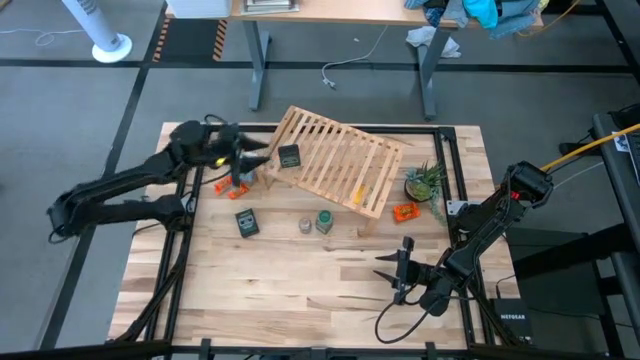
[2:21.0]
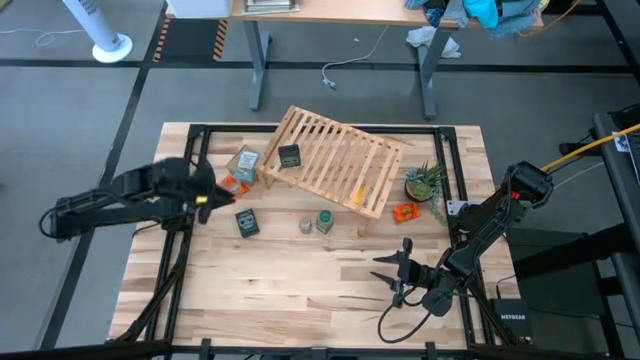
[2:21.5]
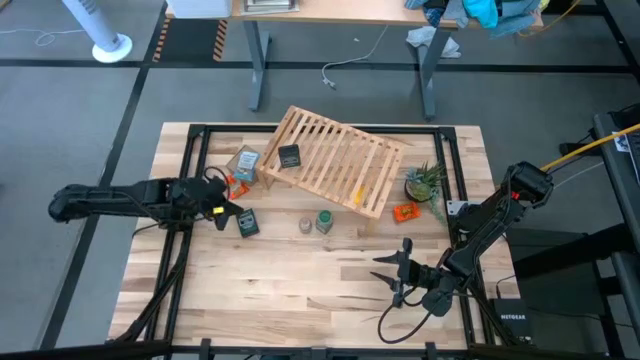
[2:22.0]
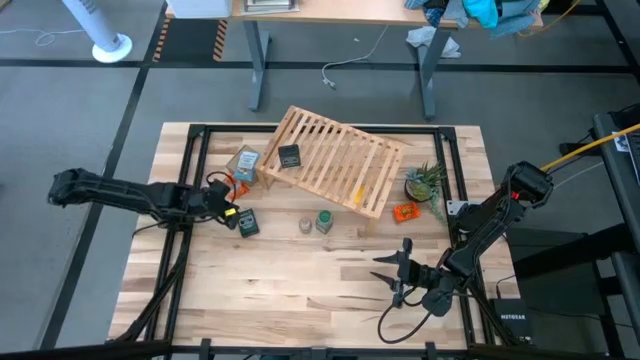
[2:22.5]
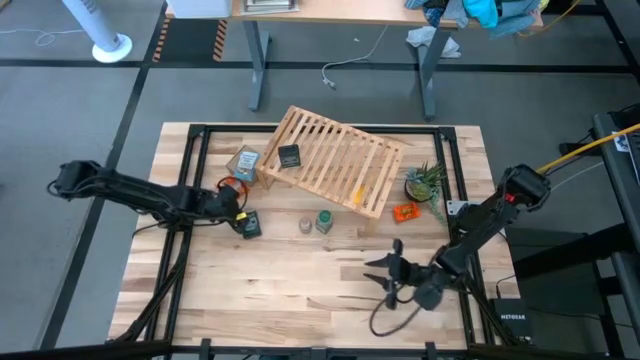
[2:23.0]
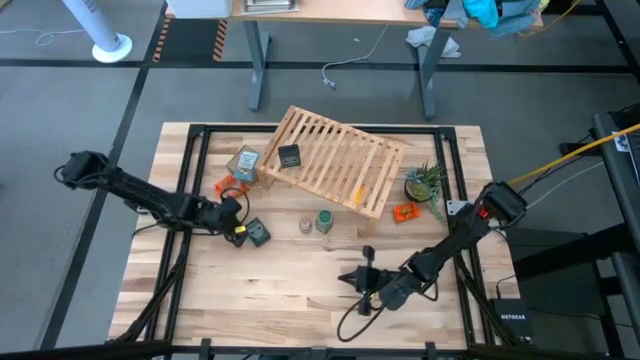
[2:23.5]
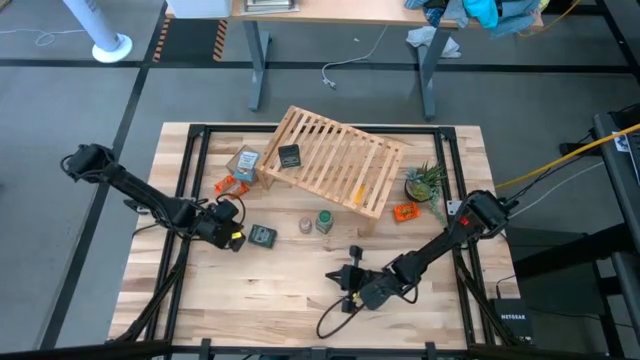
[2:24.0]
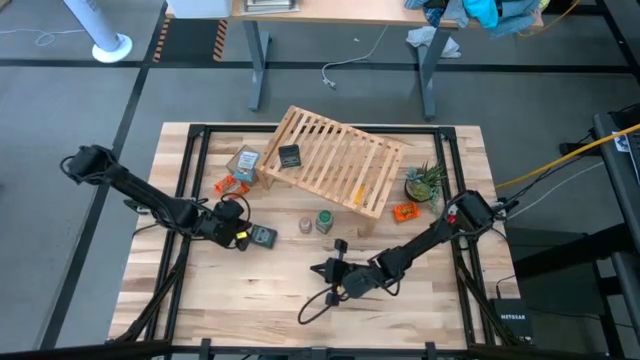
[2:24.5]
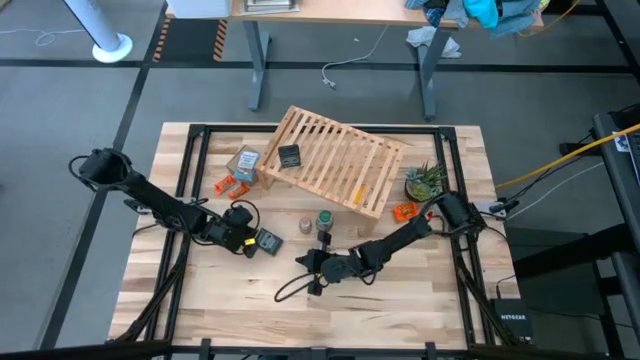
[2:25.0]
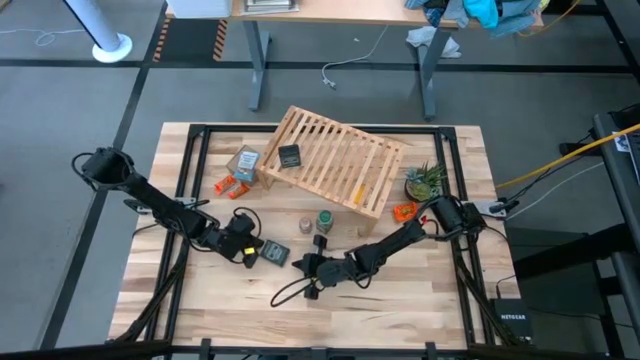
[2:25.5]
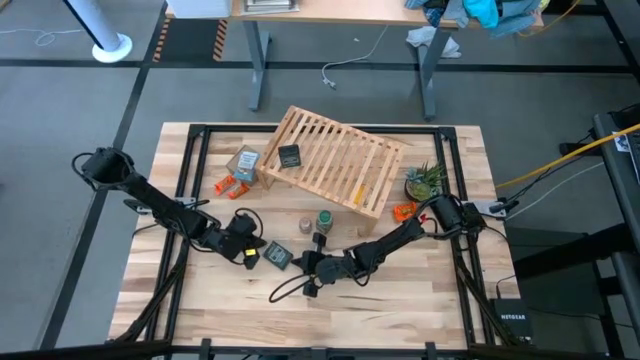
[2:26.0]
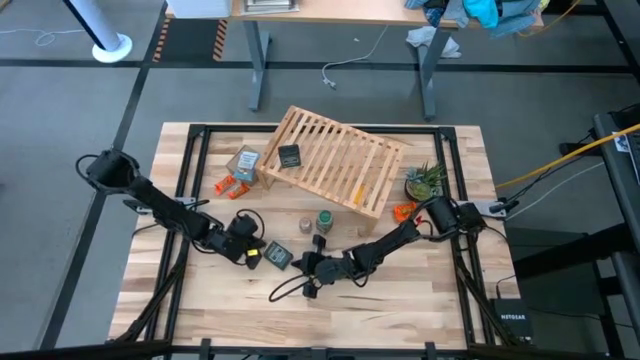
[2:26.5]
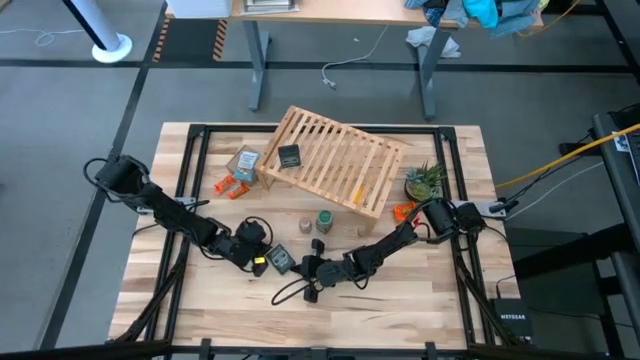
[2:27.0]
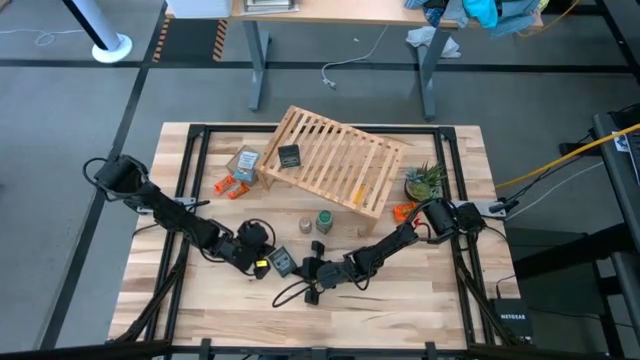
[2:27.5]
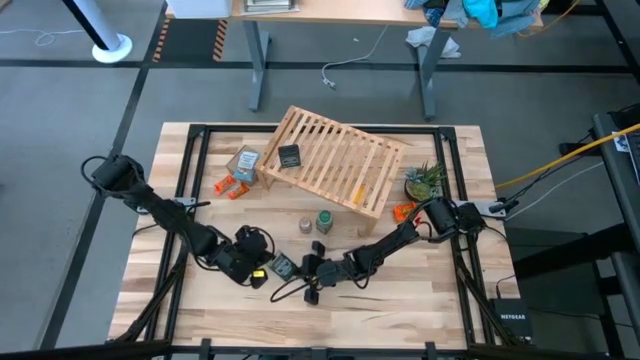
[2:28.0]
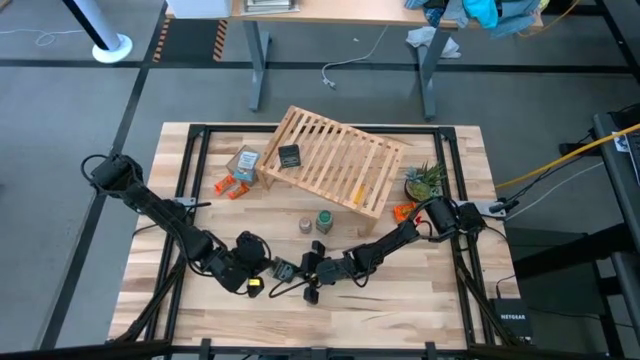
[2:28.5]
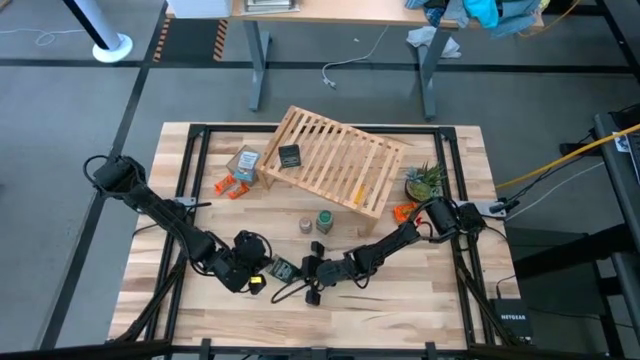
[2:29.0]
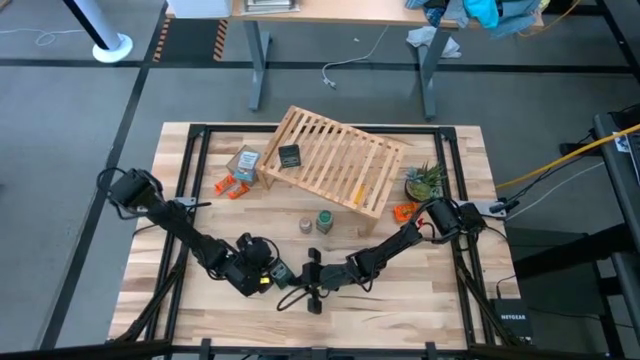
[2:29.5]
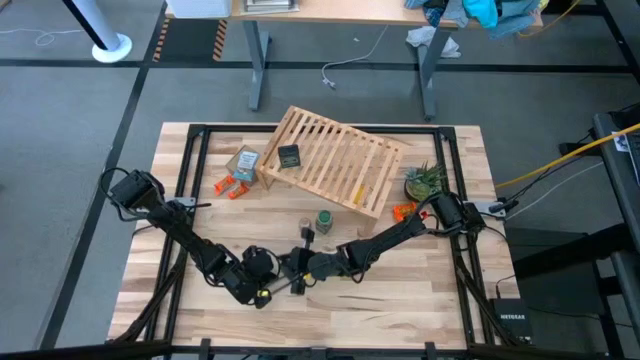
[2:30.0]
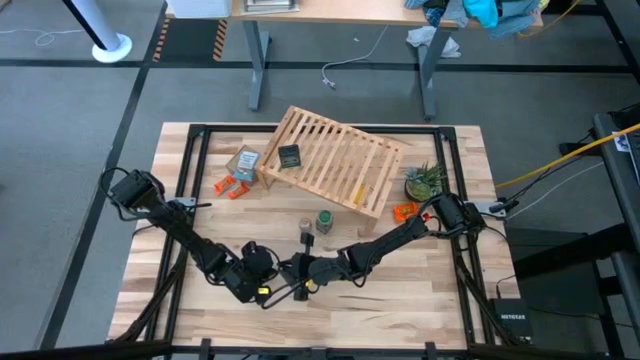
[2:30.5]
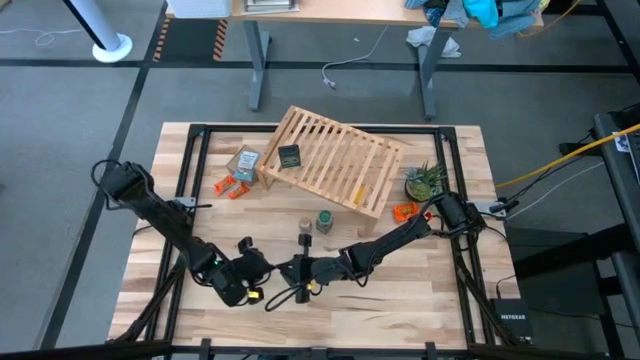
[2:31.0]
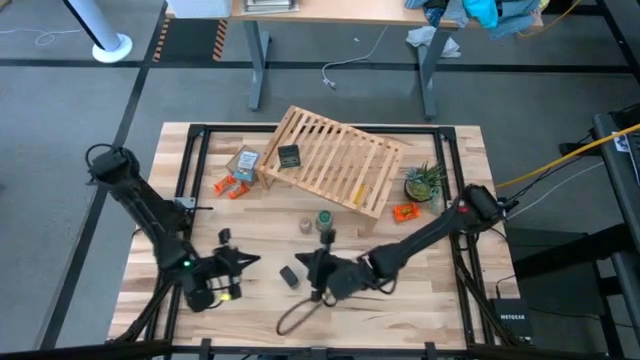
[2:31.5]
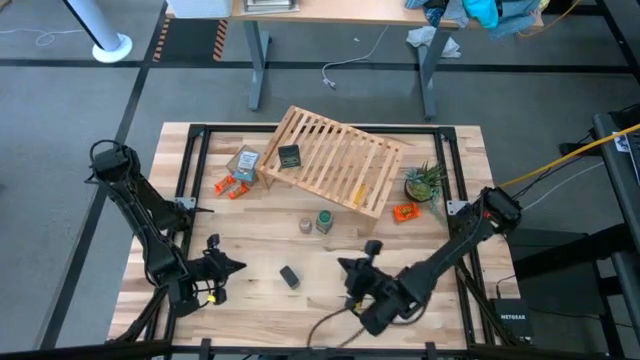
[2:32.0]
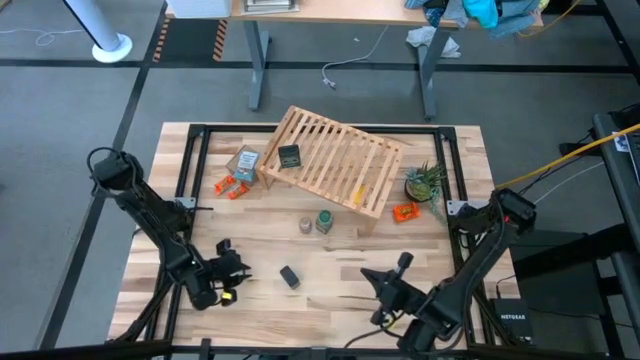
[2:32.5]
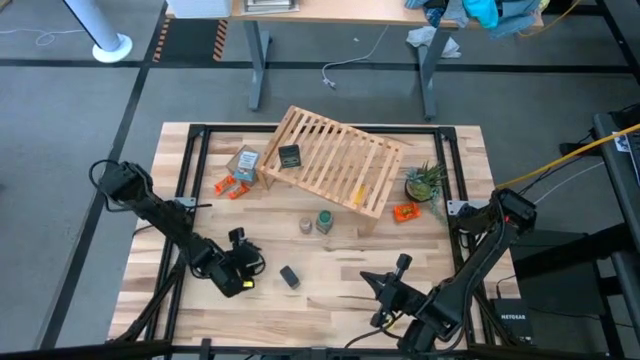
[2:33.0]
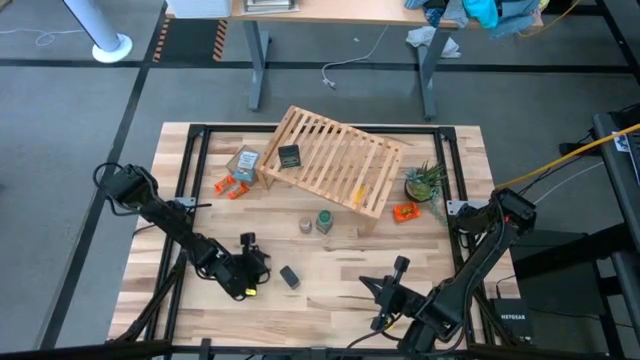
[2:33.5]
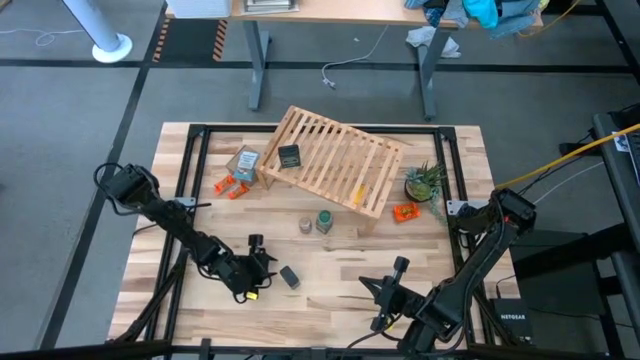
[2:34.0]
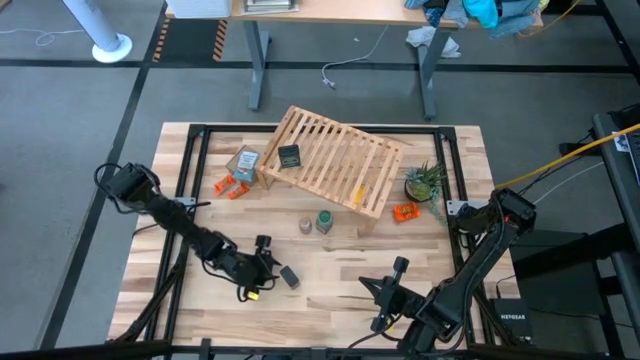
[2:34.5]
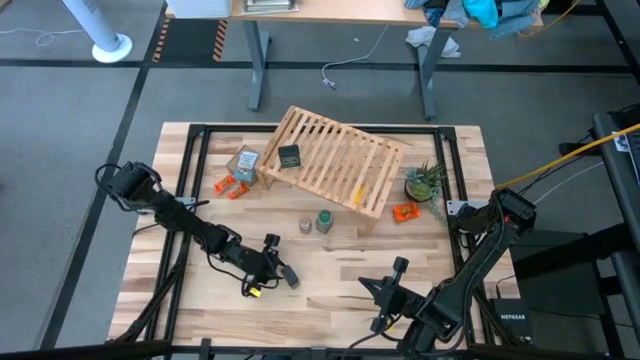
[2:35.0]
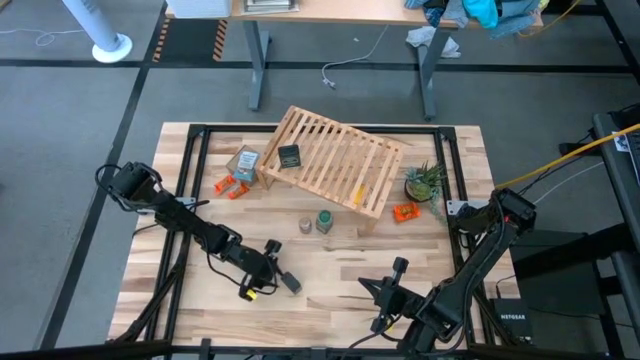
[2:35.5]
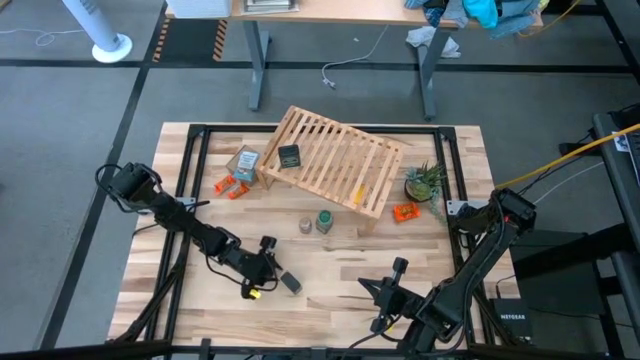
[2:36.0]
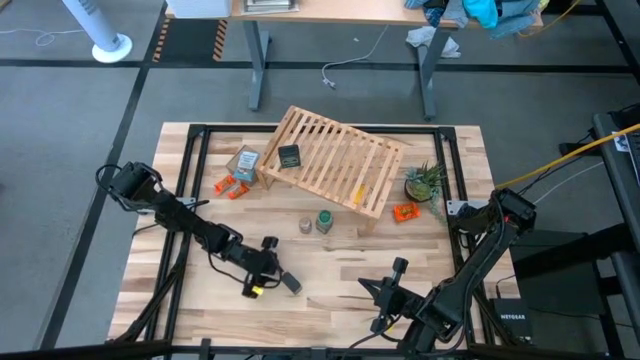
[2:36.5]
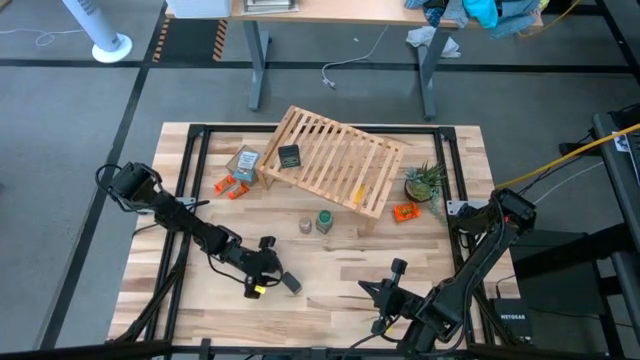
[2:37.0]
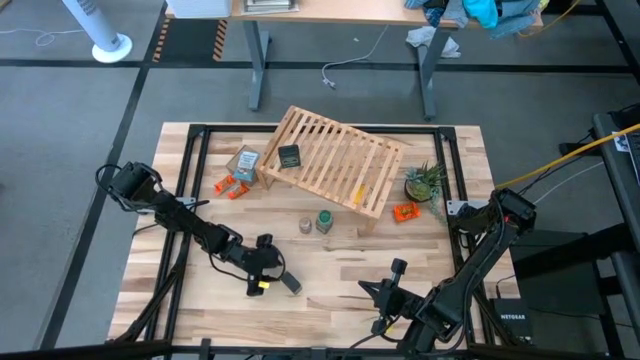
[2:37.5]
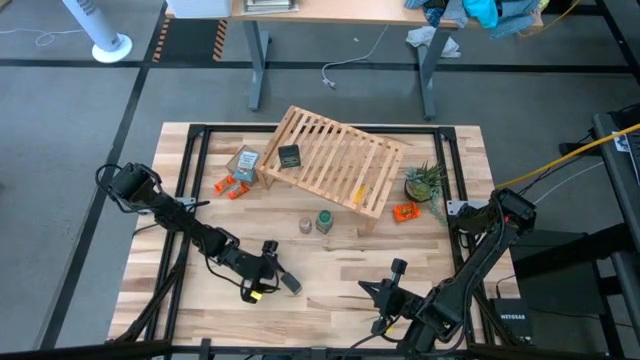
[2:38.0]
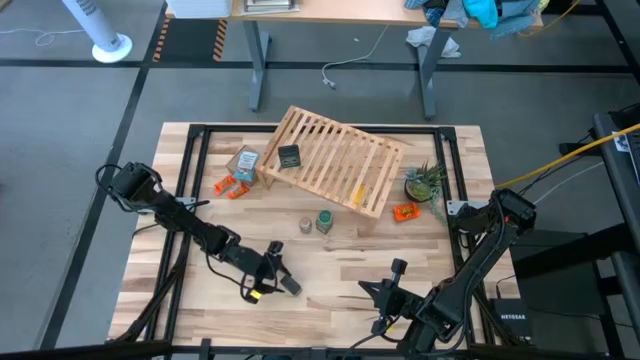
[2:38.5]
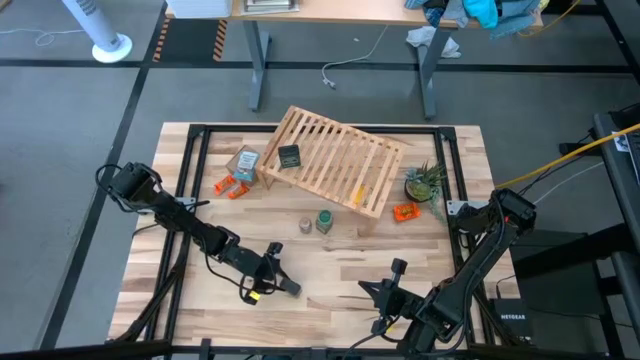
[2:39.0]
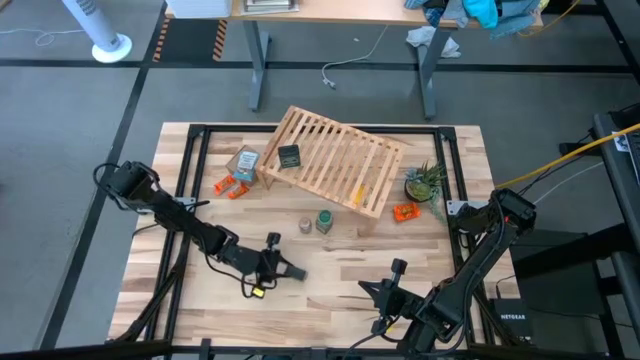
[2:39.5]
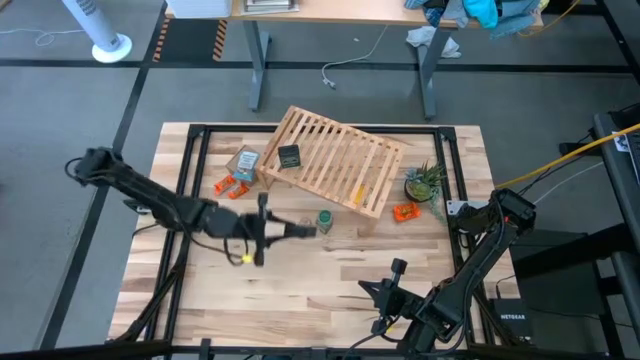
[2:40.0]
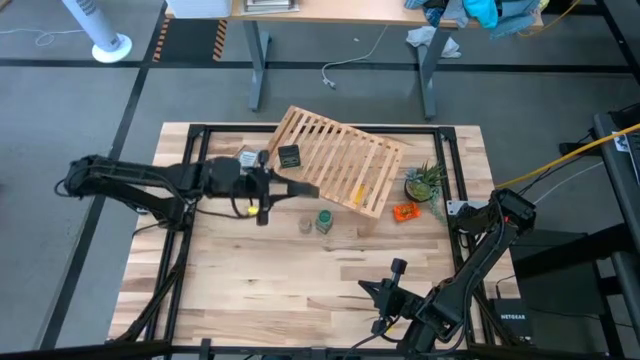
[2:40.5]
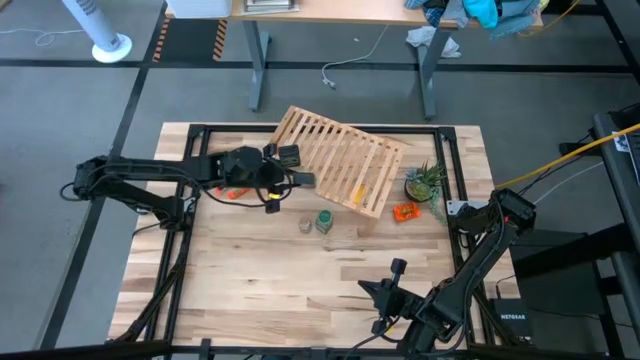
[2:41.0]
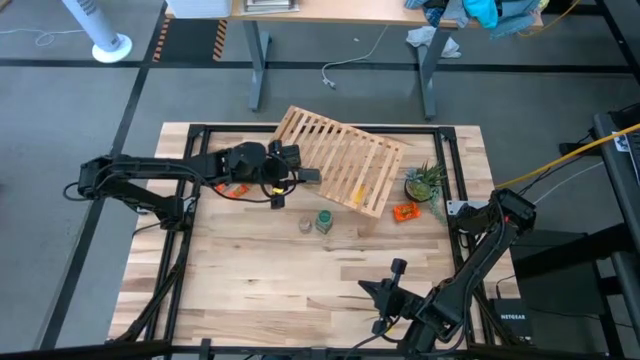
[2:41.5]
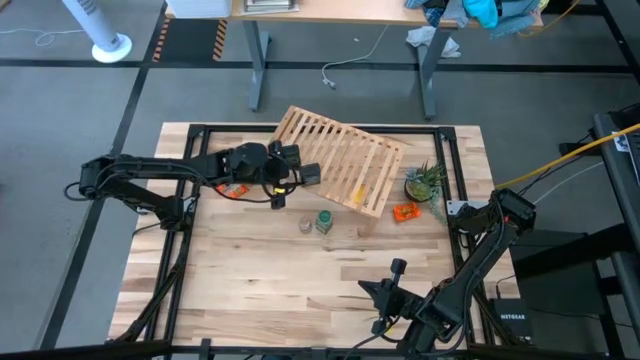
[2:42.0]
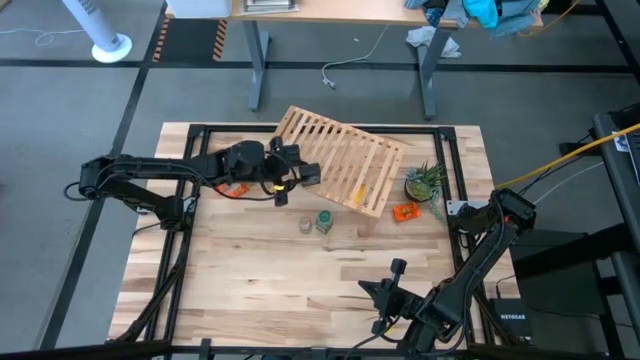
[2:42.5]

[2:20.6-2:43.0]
Task: Shelf spices
Put the green seasoning can on the shelf
